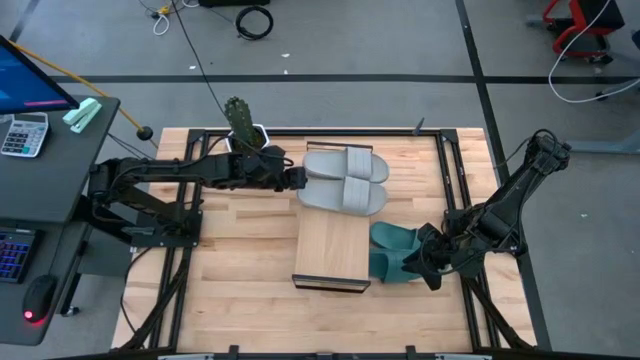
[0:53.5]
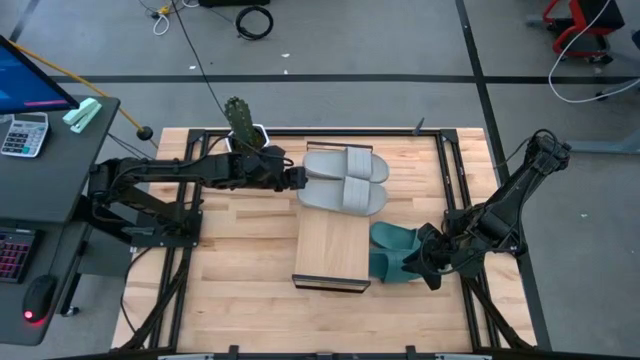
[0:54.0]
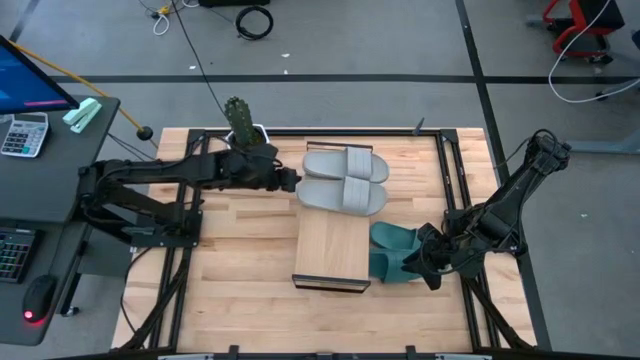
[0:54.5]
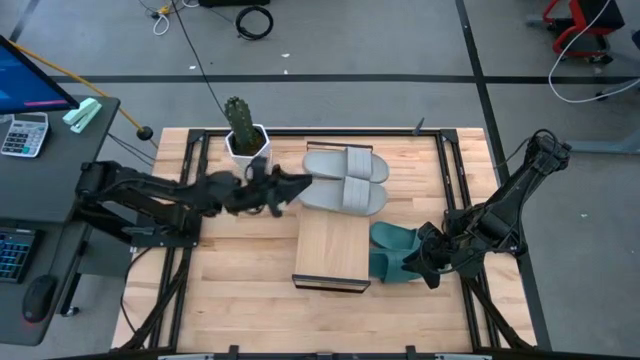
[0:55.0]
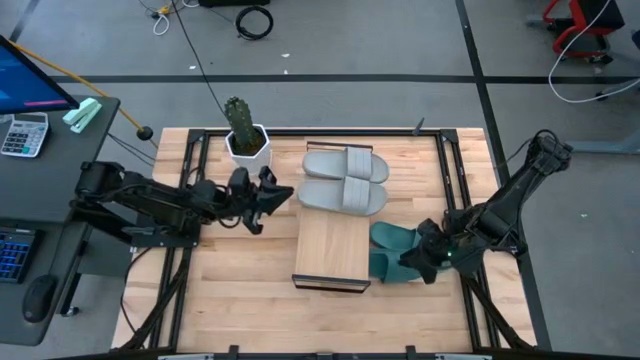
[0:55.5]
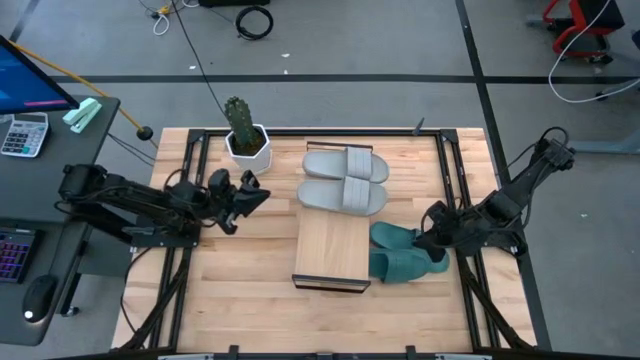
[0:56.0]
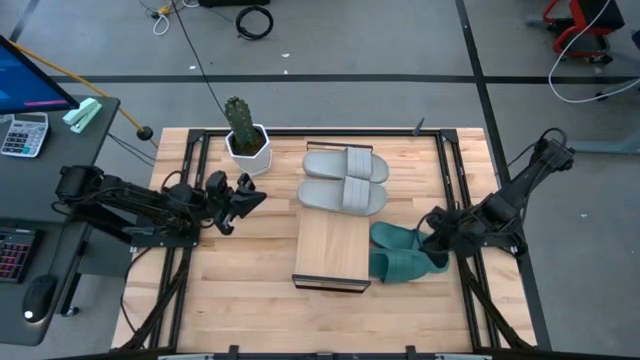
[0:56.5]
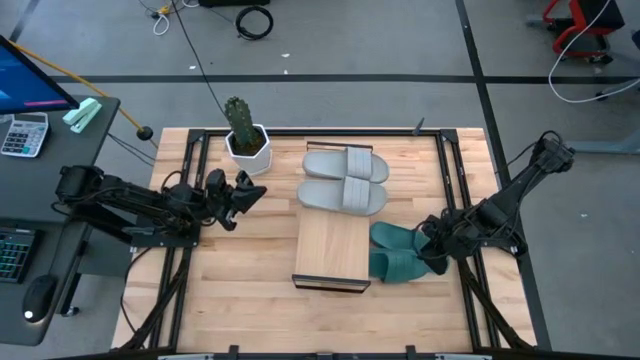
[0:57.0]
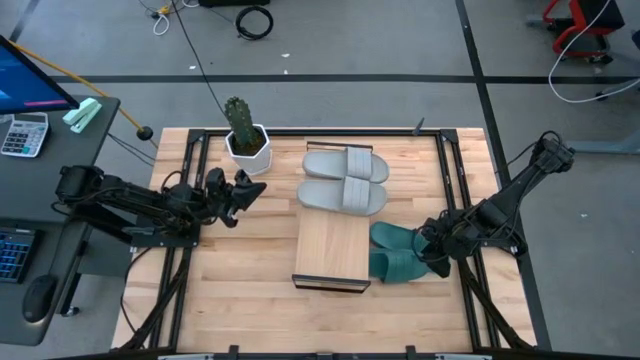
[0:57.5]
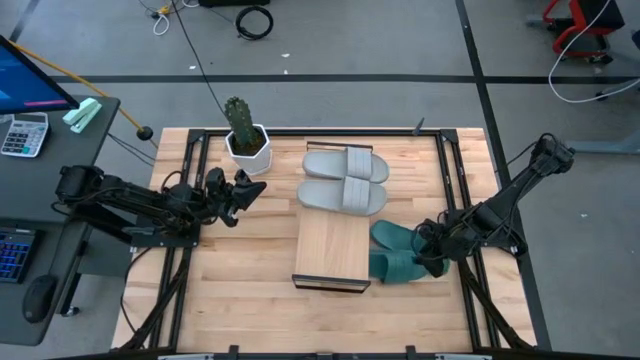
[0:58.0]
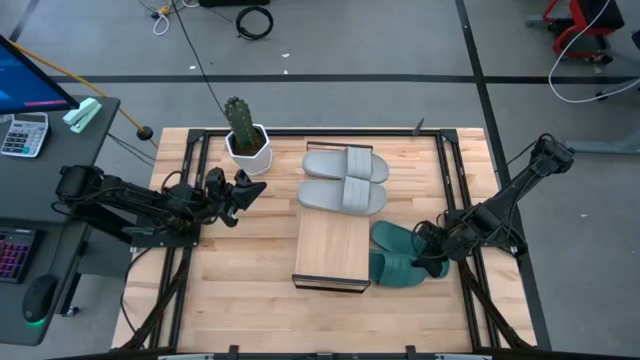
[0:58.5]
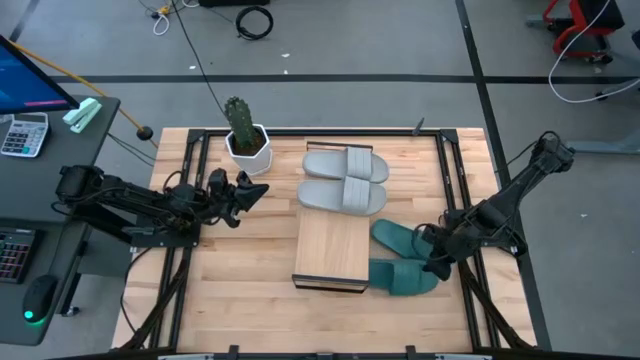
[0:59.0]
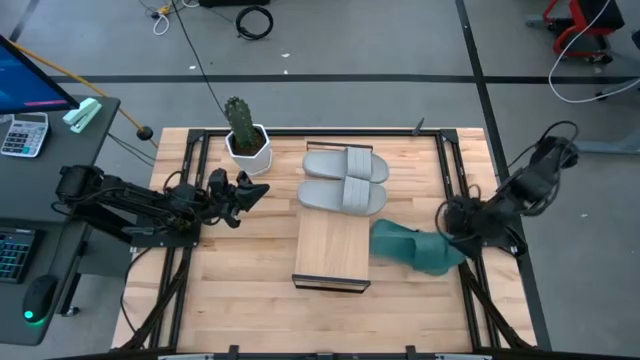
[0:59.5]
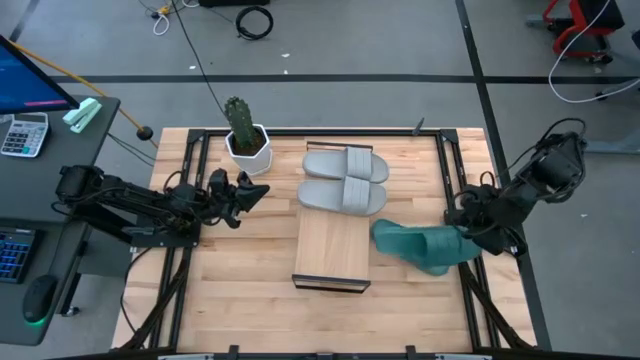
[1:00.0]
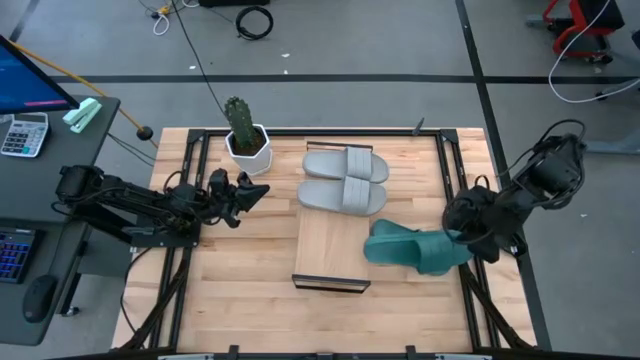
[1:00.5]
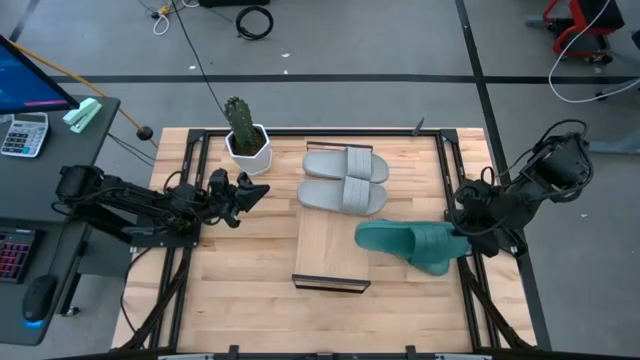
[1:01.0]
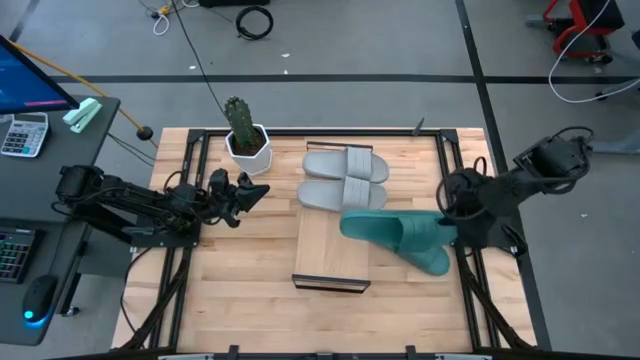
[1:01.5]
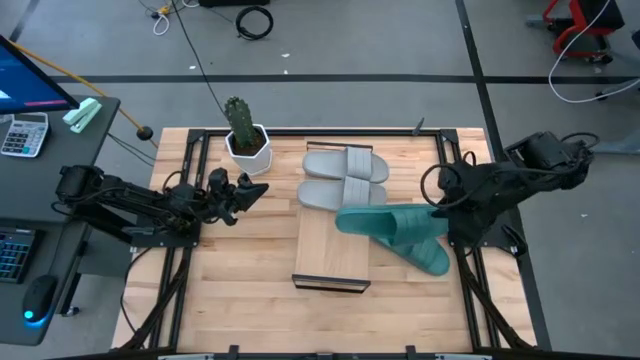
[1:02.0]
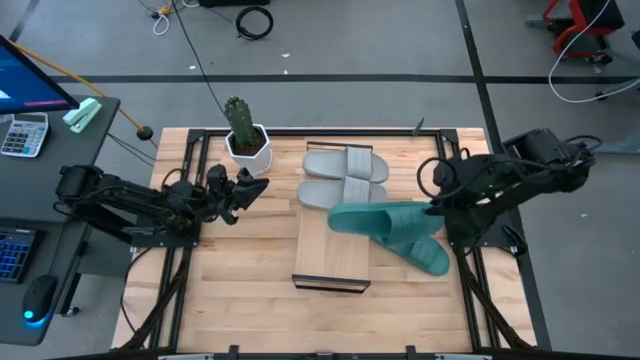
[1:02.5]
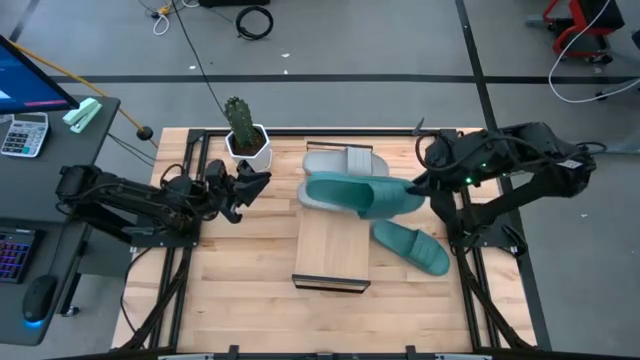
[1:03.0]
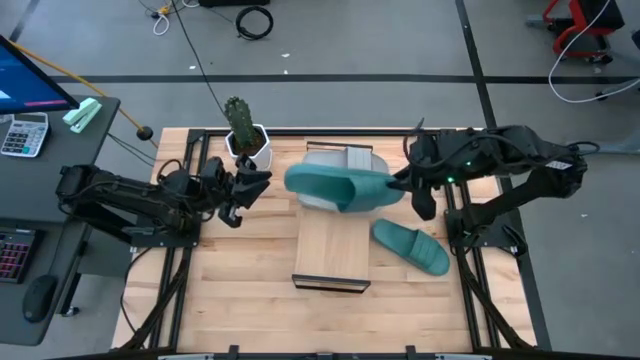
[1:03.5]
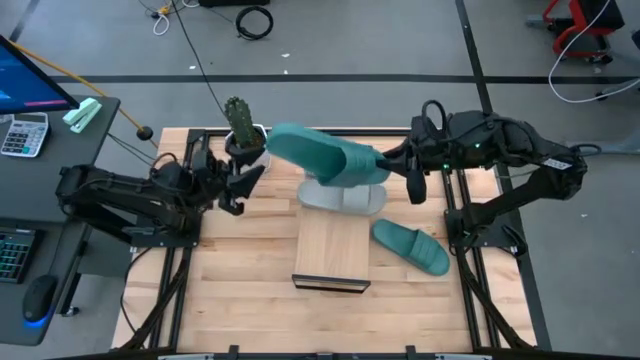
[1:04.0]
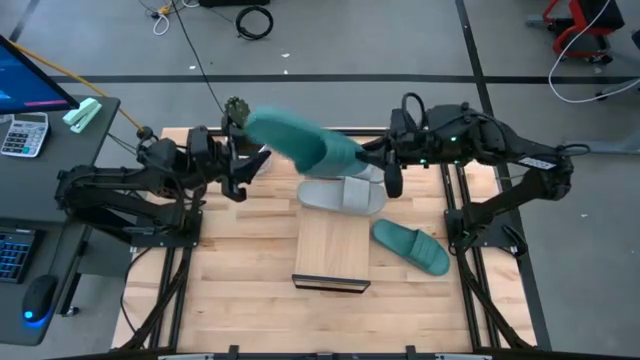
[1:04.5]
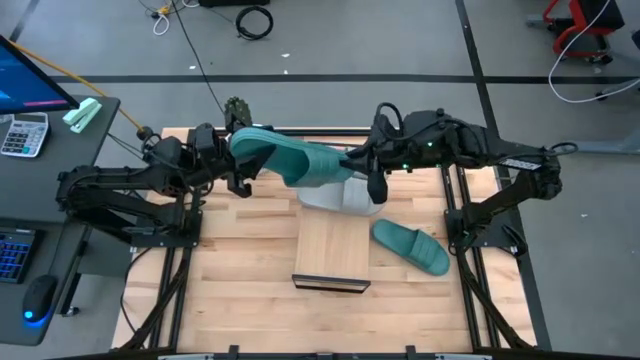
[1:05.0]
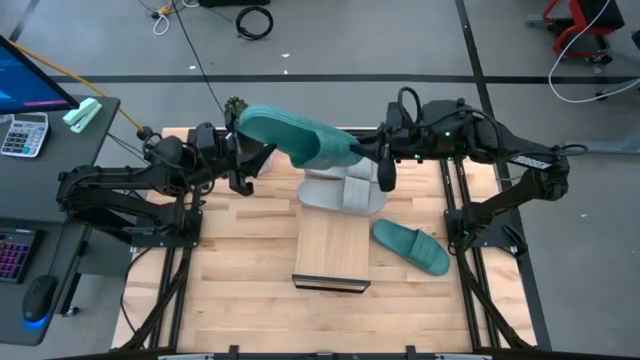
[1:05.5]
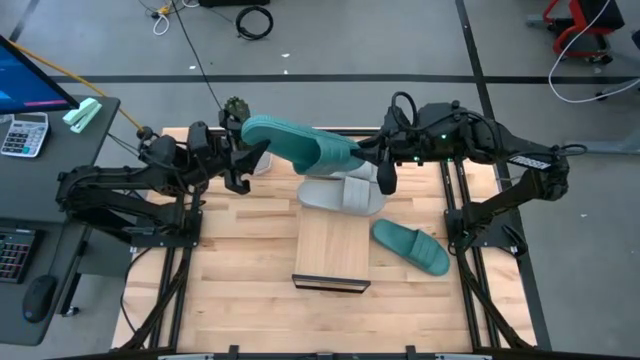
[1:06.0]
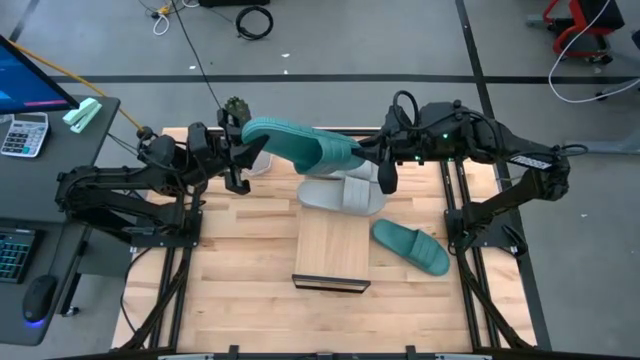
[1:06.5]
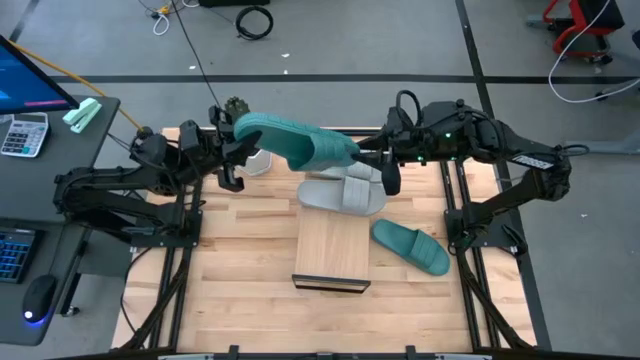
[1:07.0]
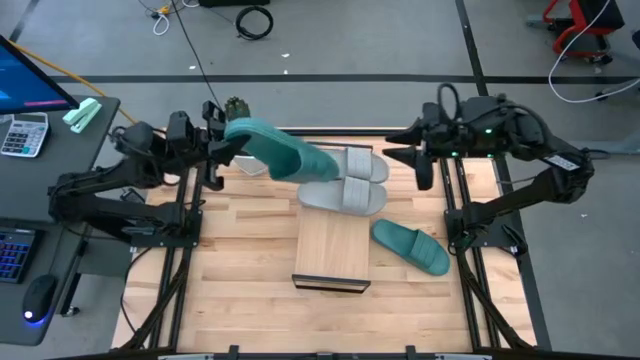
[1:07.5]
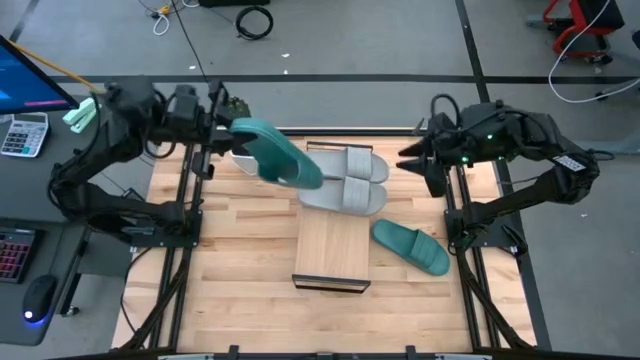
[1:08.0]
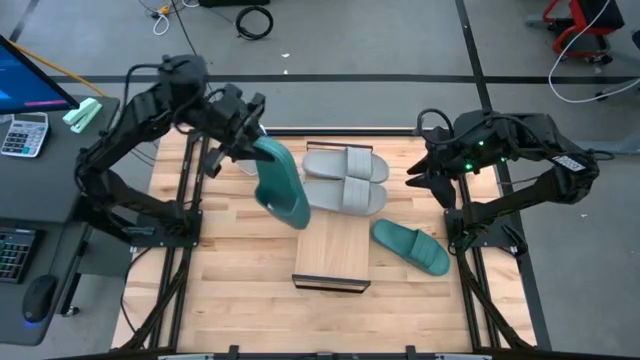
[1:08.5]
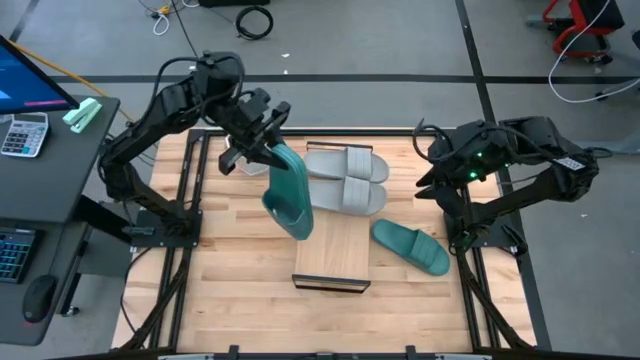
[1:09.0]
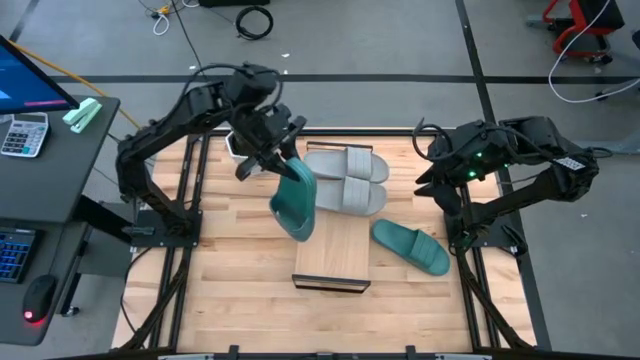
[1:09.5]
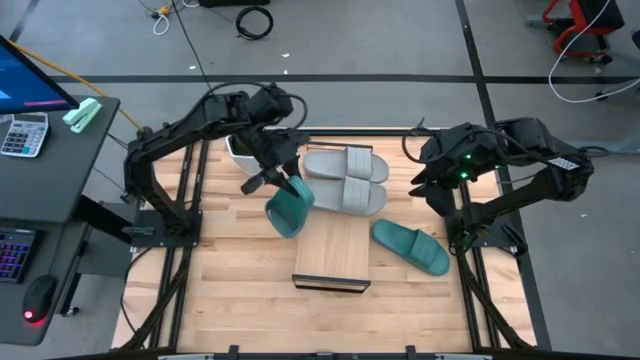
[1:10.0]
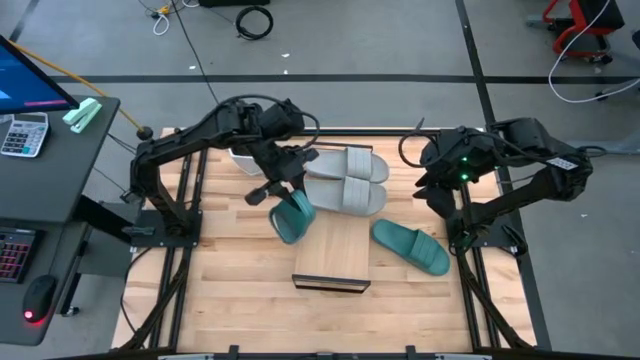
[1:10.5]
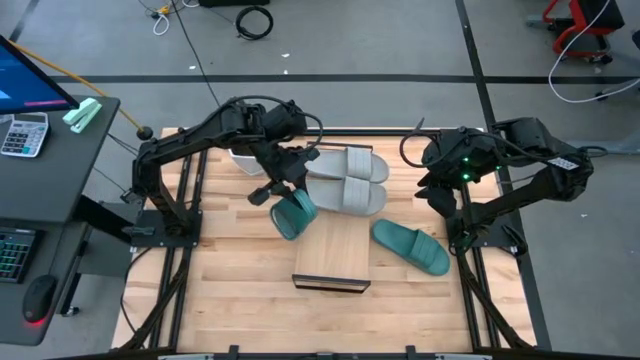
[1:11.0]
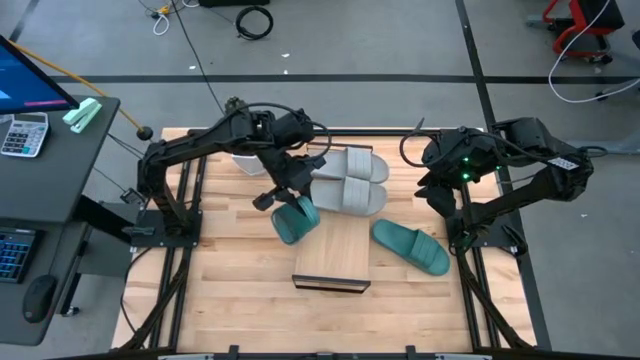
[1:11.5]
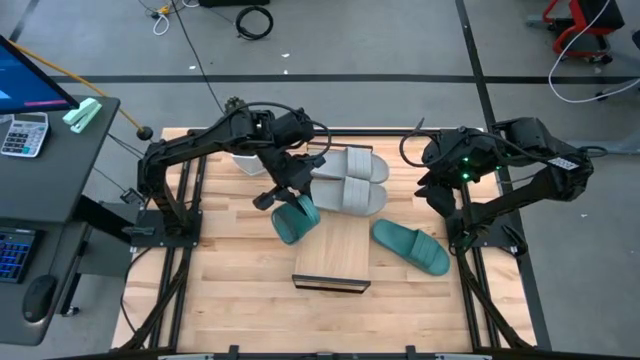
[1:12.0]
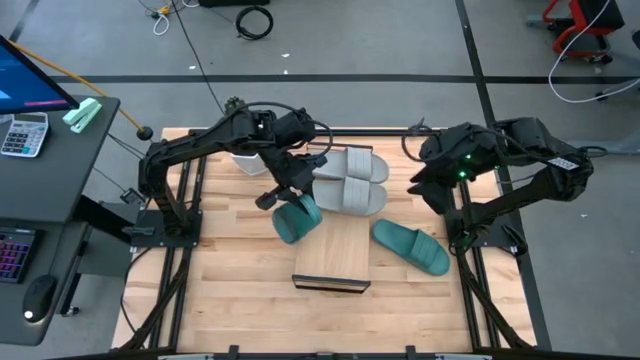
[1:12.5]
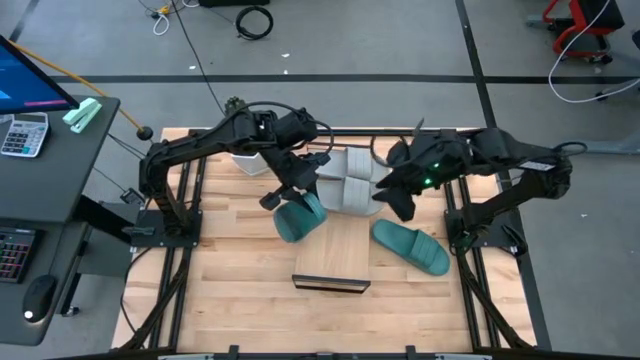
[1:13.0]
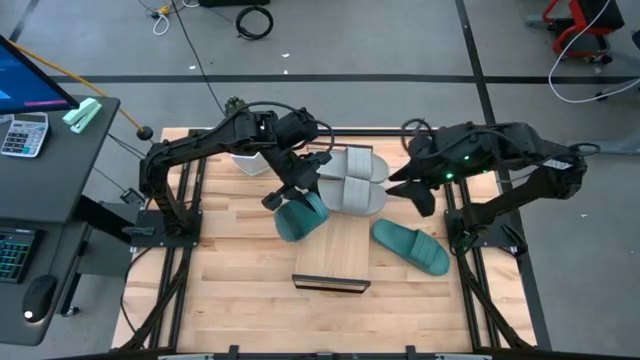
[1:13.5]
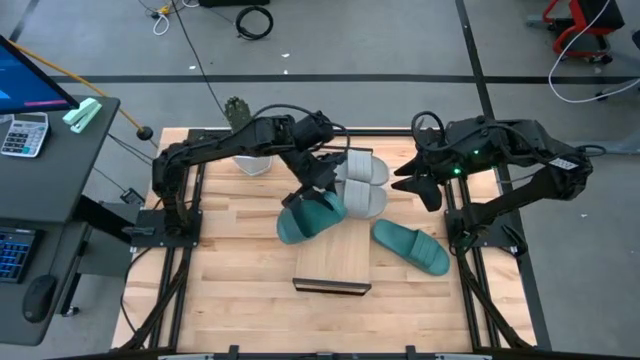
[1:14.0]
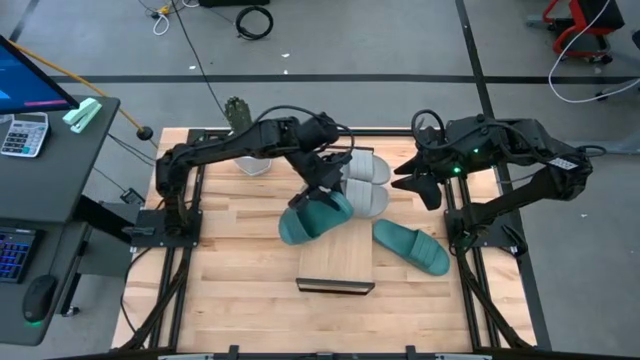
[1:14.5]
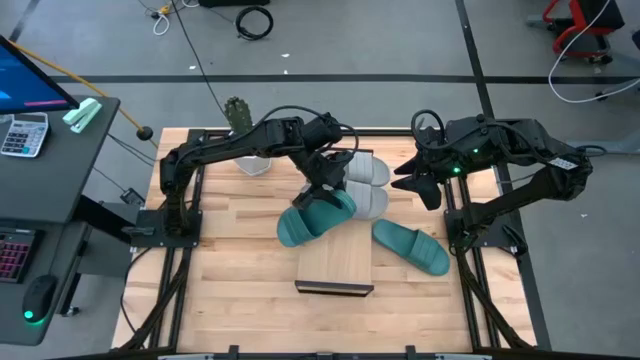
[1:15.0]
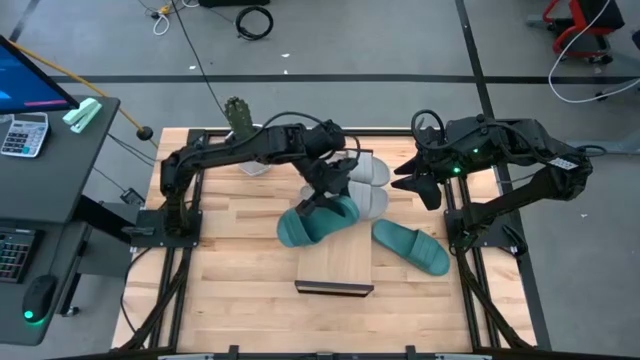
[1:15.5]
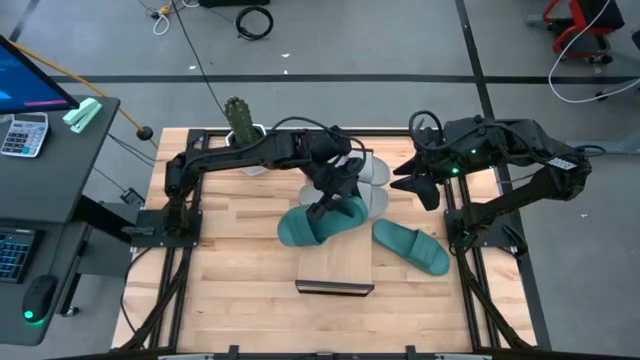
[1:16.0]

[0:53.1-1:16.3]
Task: Pick and place slides into the shelf
Put the bottom green slipper onto the shelf
